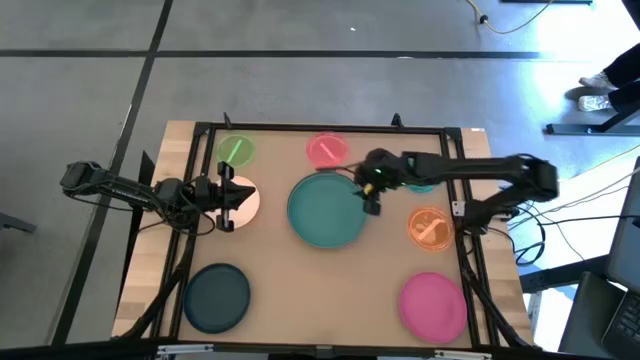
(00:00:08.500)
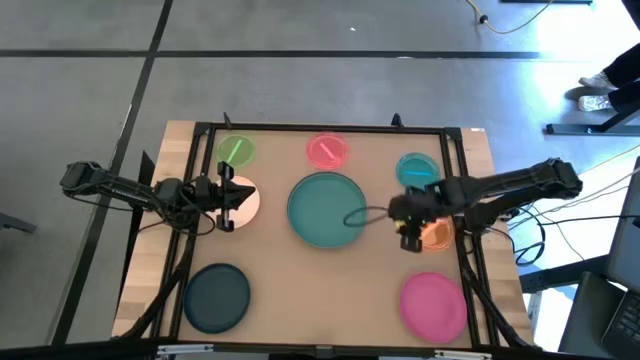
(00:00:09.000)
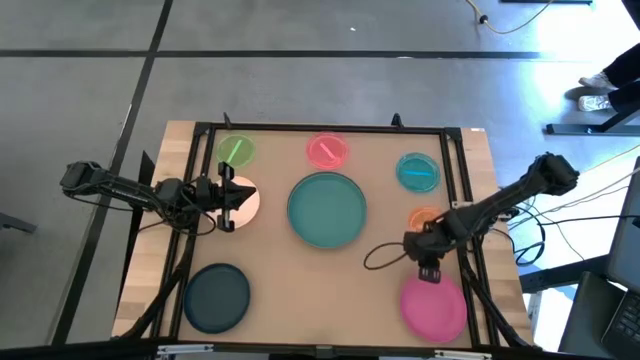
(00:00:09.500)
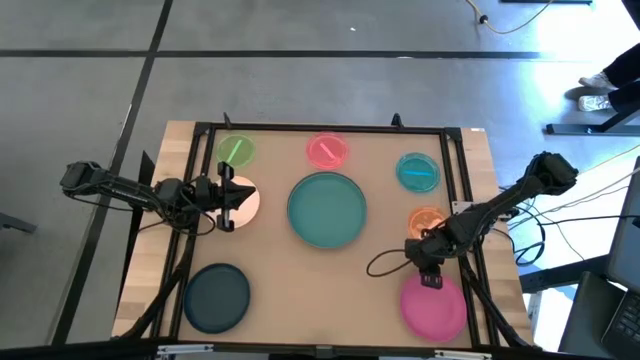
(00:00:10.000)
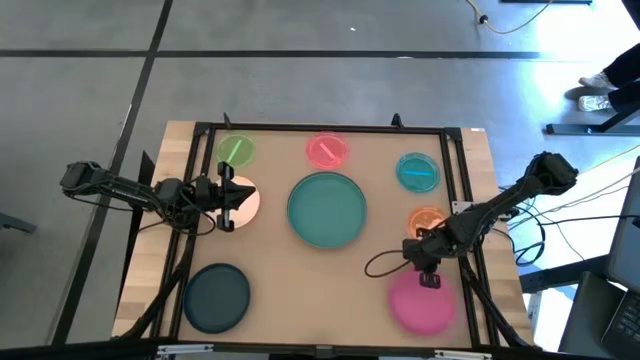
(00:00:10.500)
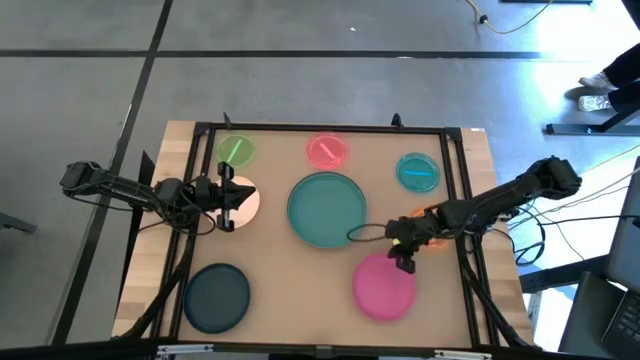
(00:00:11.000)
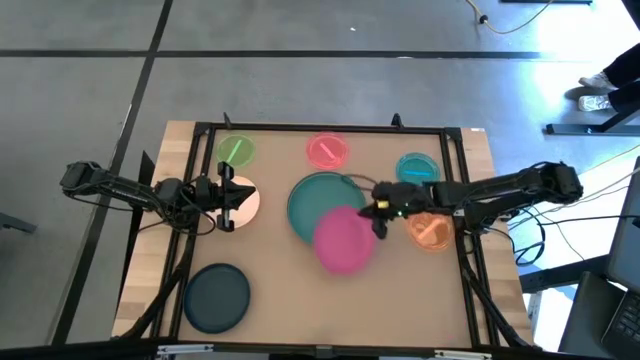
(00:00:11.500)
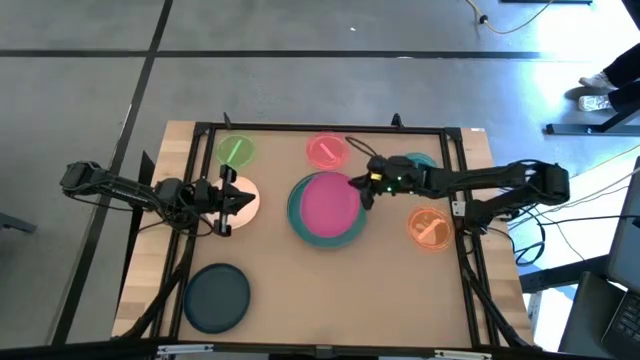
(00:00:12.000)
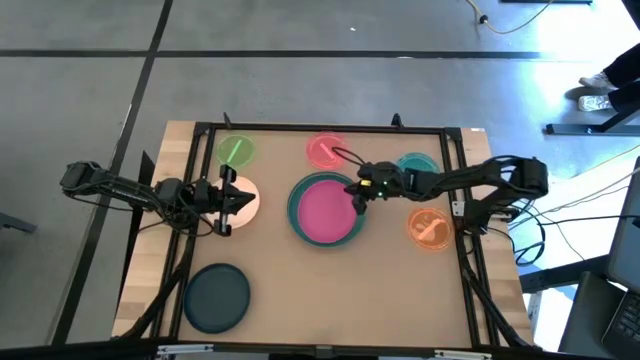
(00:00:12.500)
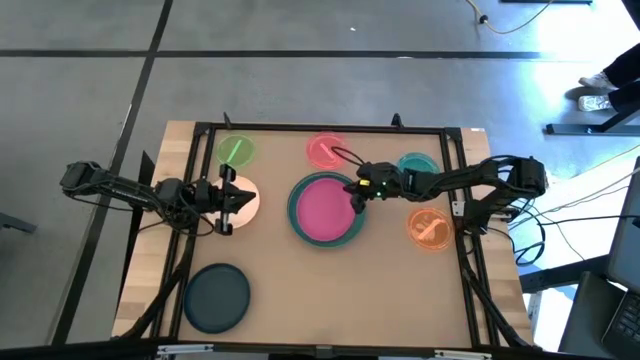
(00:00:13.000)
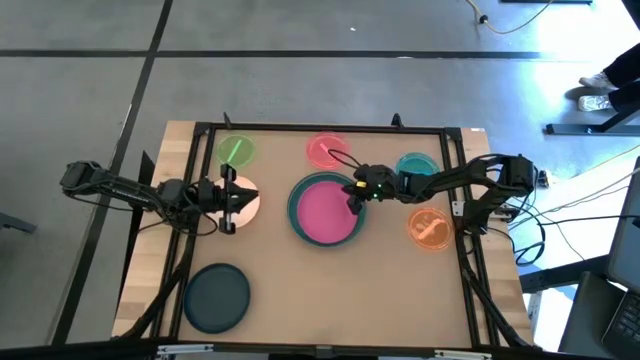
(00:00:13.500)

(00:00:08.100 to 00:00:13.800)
Task: Stack plastic plates
Stack the pink plate on top of the green plate

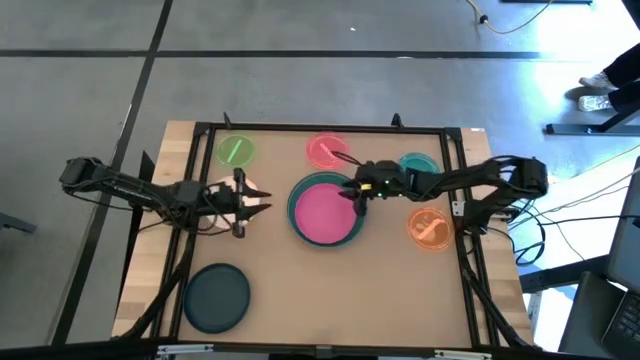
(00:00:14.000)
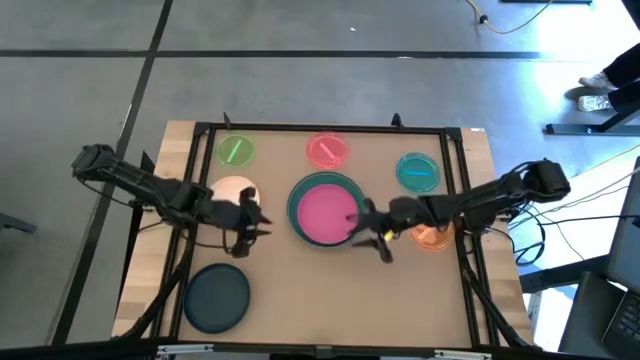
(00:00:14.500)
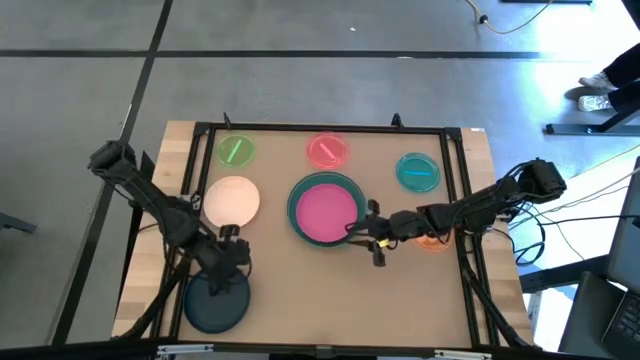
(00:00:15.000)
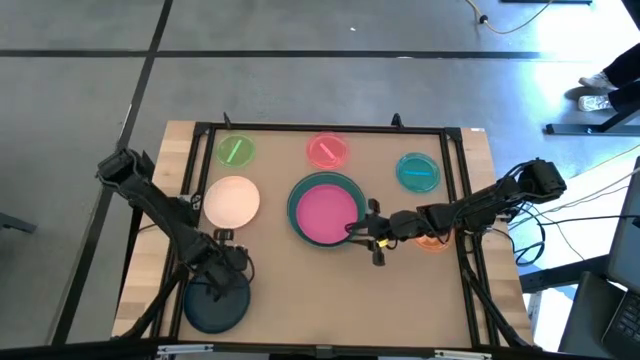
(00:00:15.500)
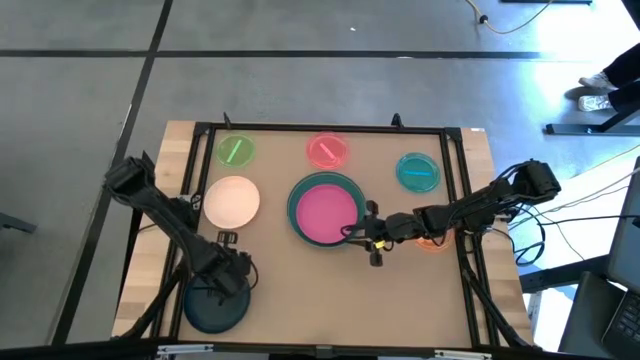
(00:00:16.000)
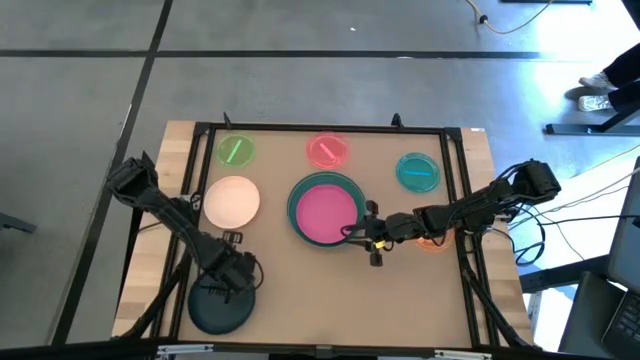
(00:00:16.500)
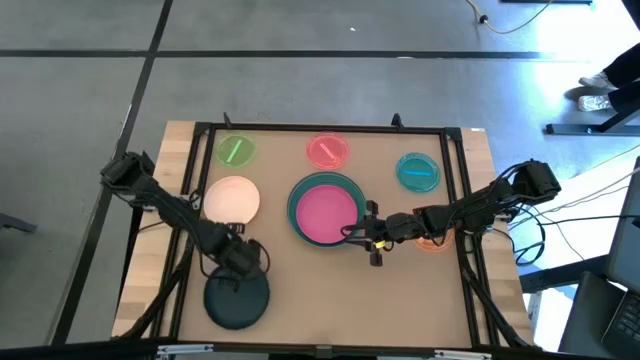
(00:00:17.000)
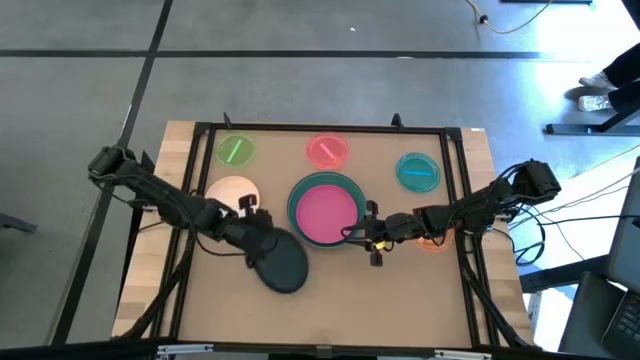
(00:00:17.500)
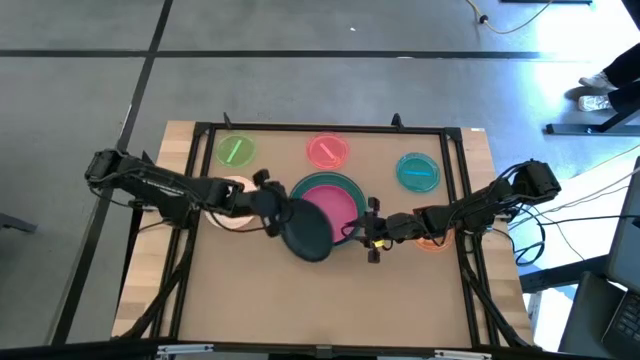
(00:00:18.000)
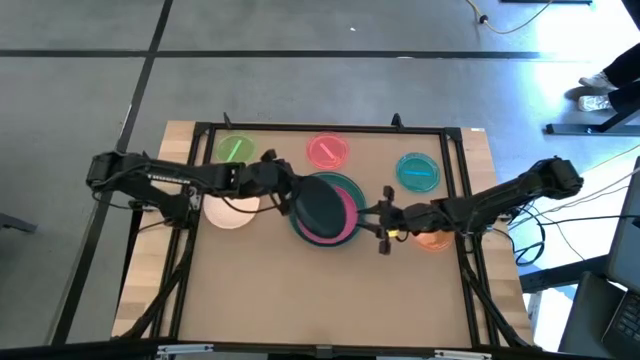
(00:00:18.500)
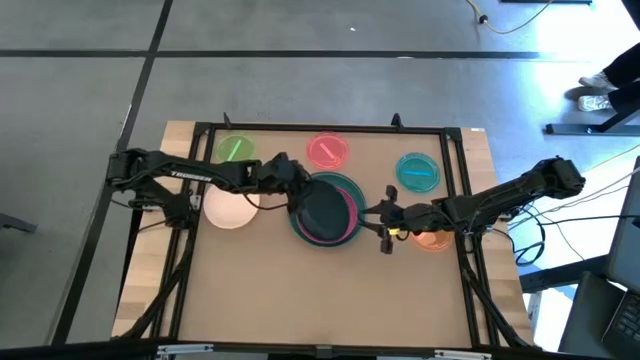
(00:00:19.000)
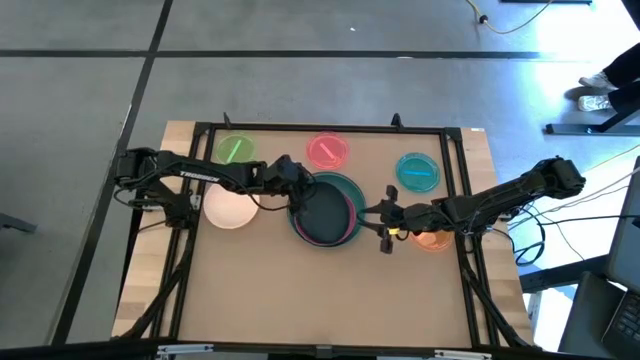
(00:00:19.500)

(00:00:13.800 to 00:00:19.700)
Stack the black plate on top of the pink plate

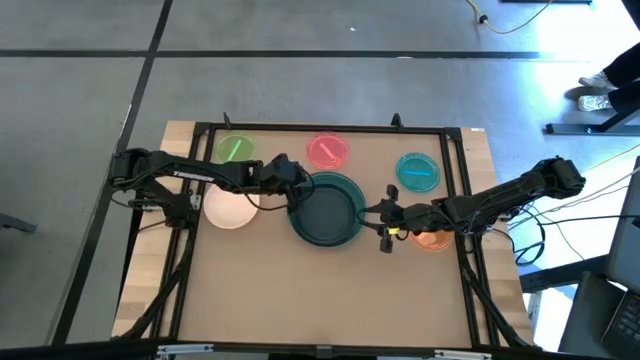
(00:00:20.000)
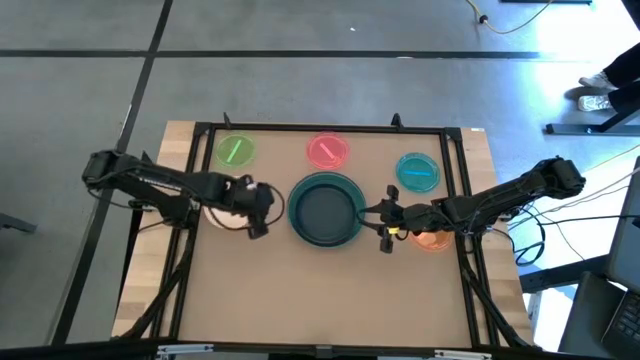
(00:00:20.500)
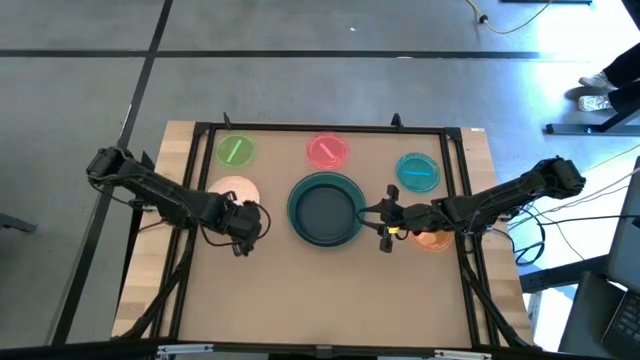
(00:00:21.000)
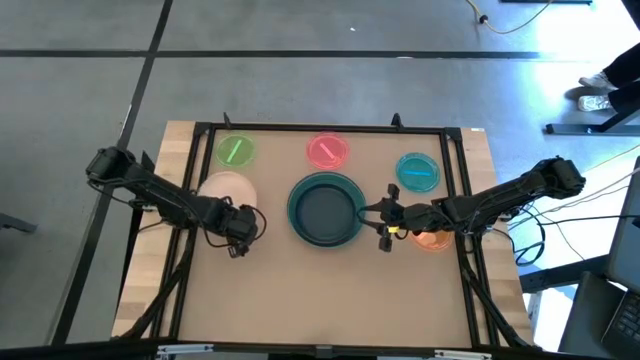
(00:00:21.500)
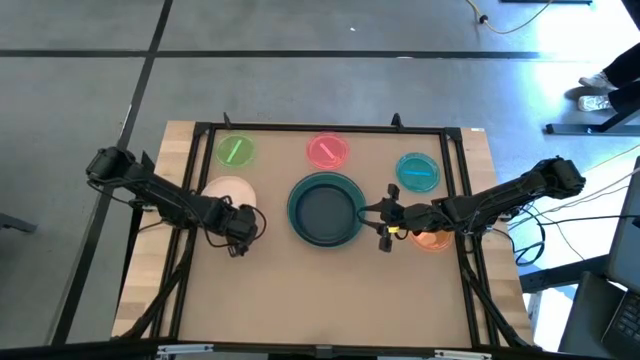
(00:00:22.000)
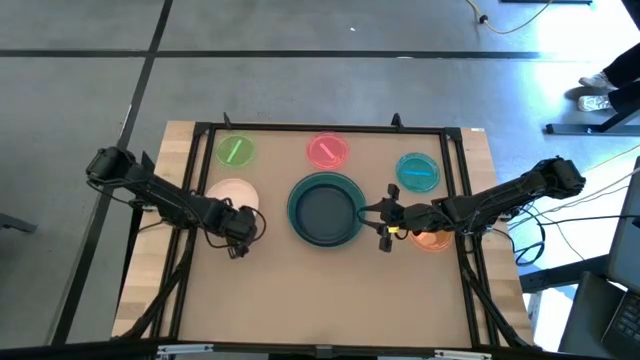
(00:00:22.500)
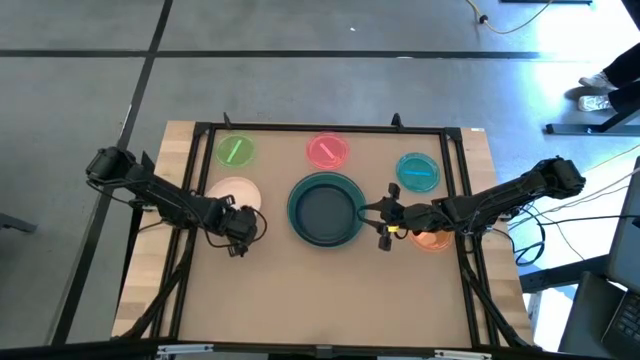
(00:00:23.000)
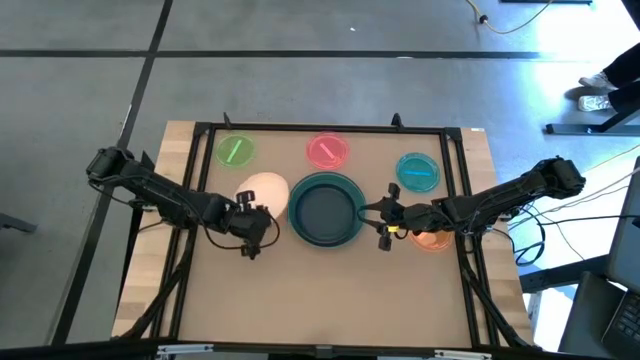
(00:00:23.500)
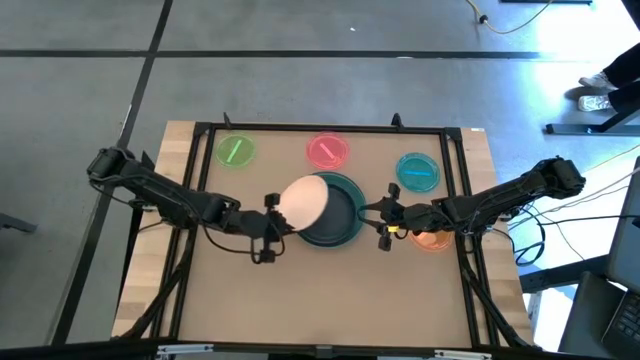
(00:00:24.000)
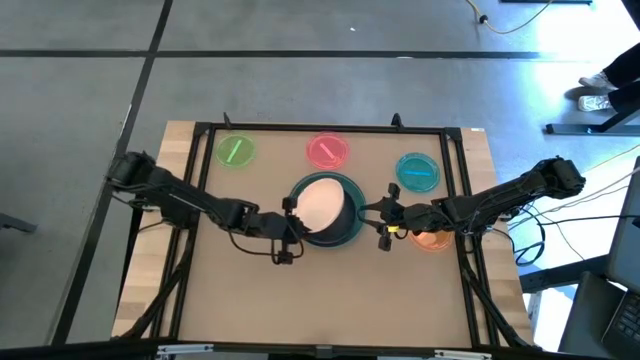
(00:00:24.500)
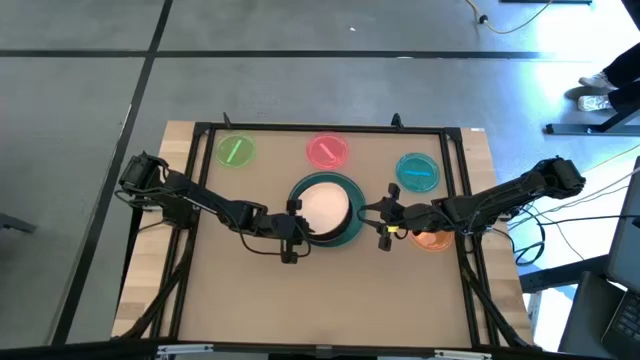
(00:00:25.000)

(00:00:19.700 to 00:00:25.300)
Stack the orange plate on top of the black plate

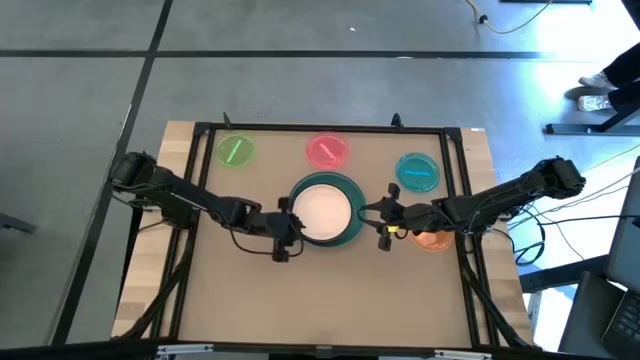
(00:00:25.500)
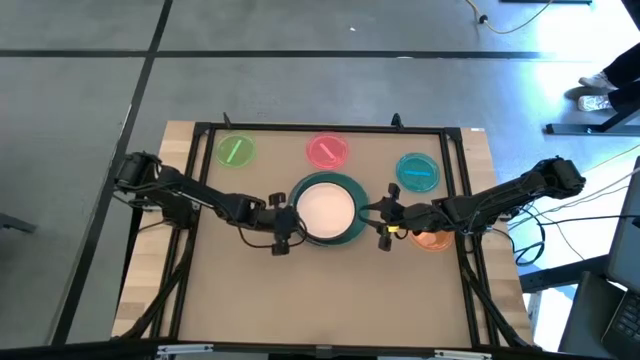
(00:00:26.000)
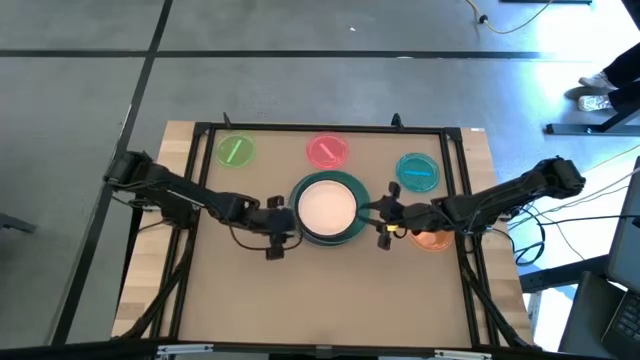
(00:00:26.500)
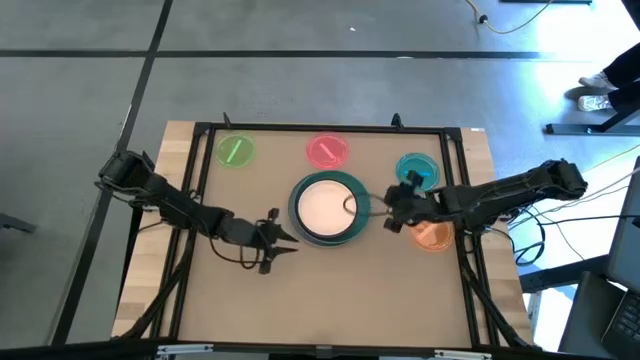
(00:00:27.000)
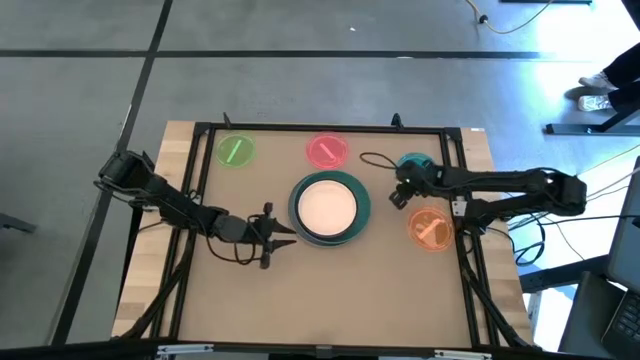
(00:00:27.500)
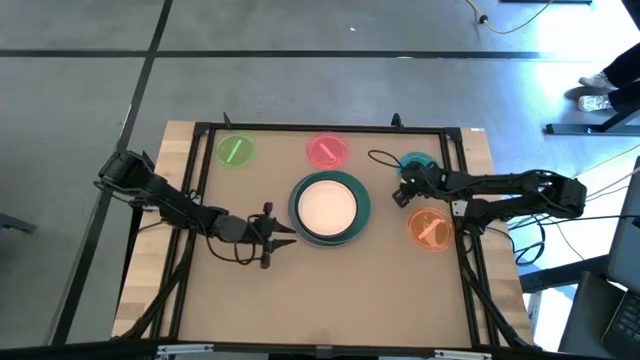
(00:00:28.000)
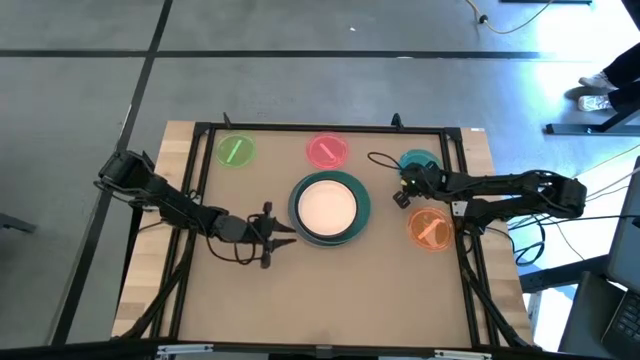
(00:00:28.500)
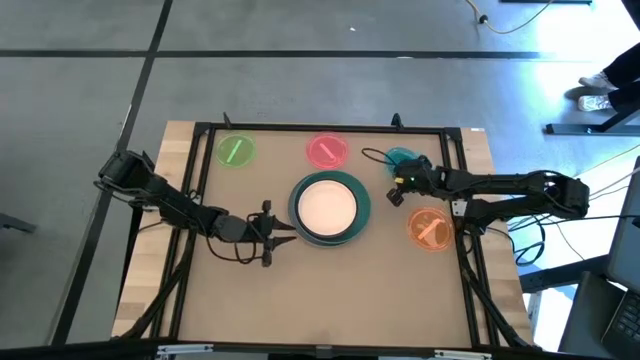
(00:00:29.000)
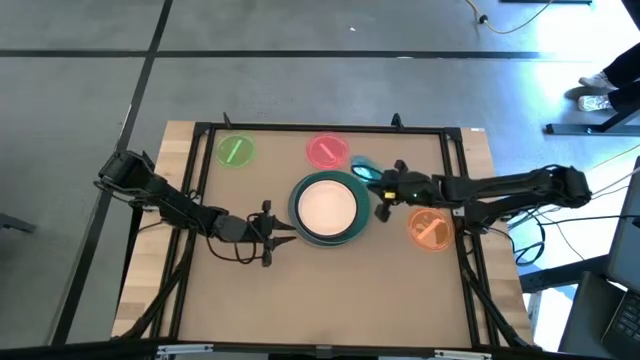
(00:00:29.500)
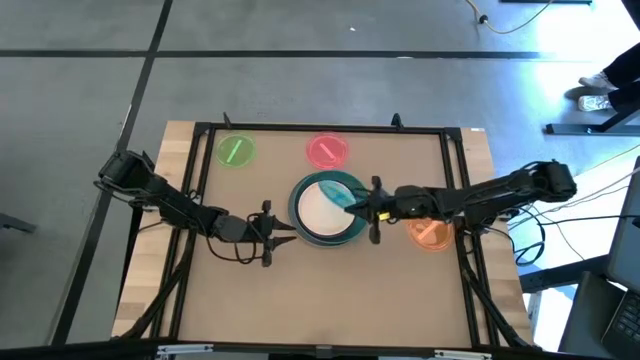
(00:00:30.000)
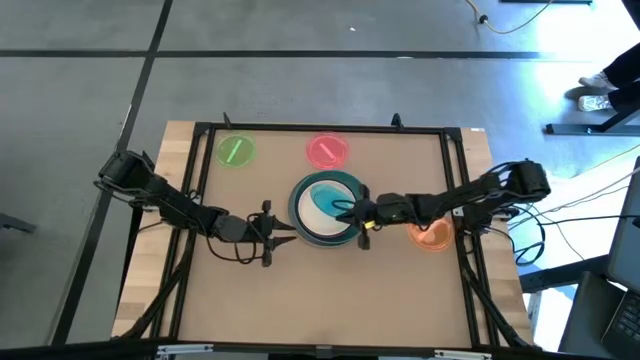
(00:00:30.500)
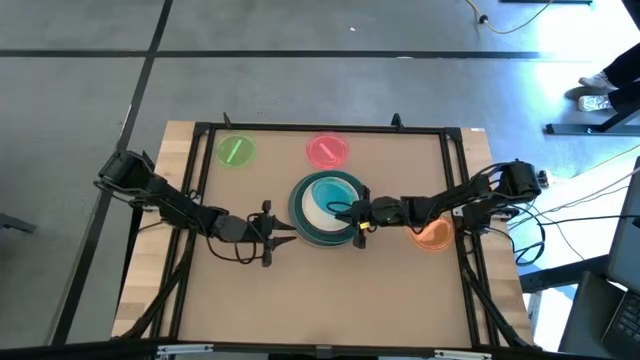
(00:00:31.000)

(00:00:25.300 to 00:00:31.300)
Stack the blue plate on top of the orange plate
